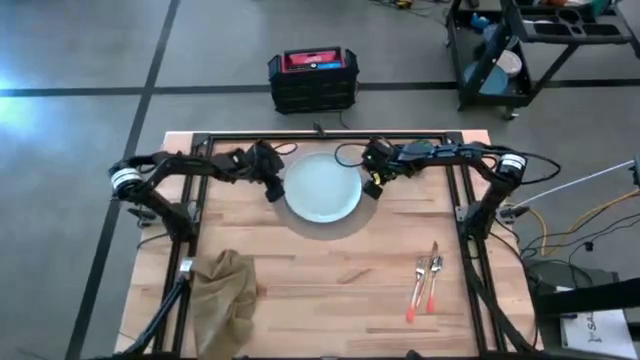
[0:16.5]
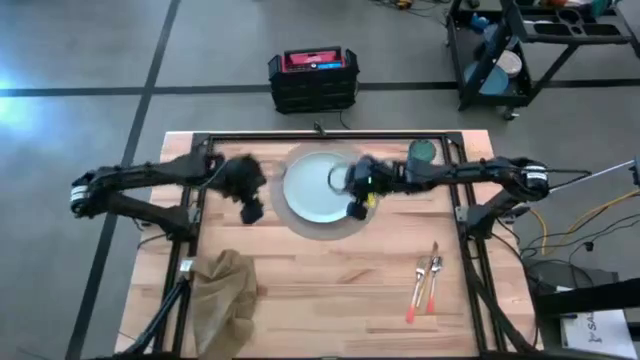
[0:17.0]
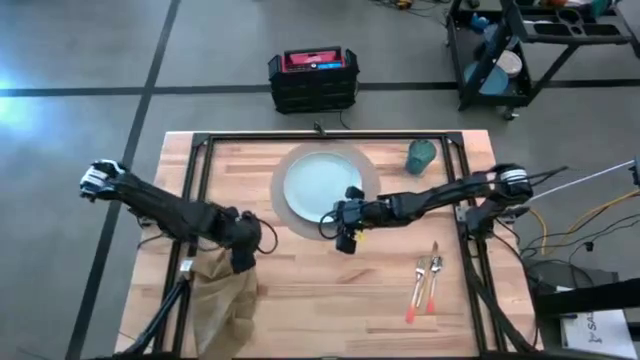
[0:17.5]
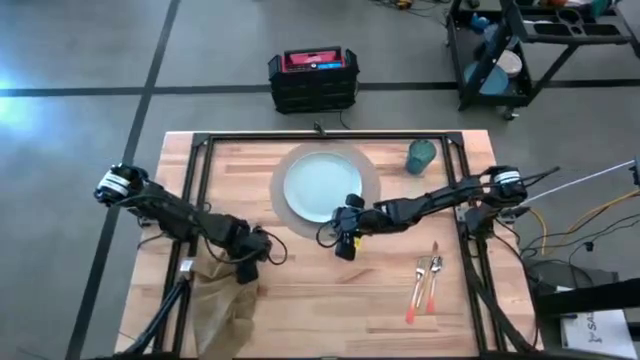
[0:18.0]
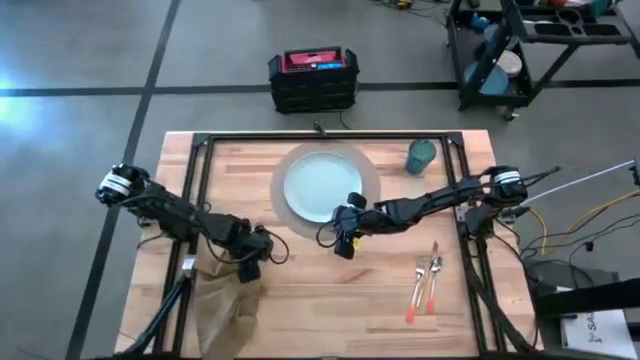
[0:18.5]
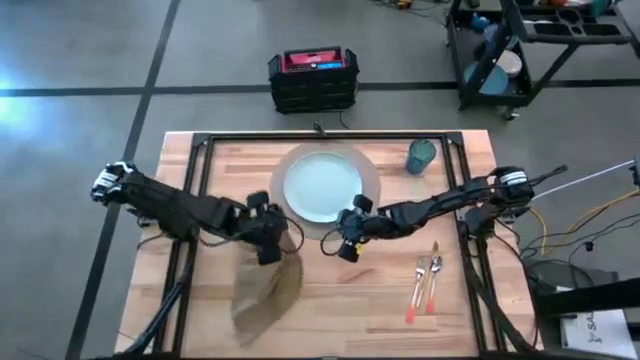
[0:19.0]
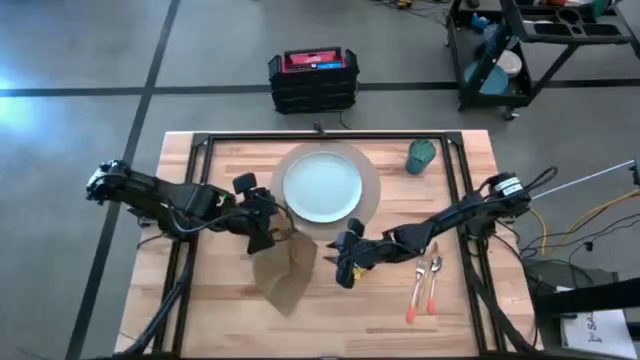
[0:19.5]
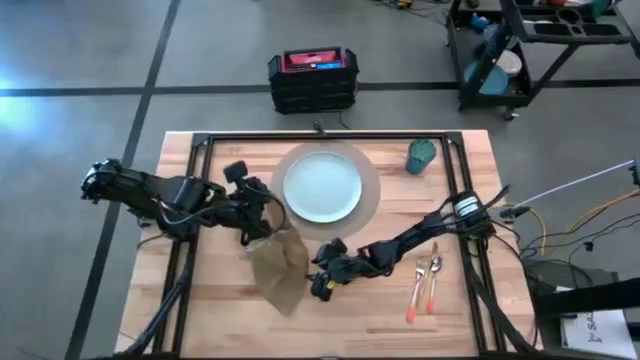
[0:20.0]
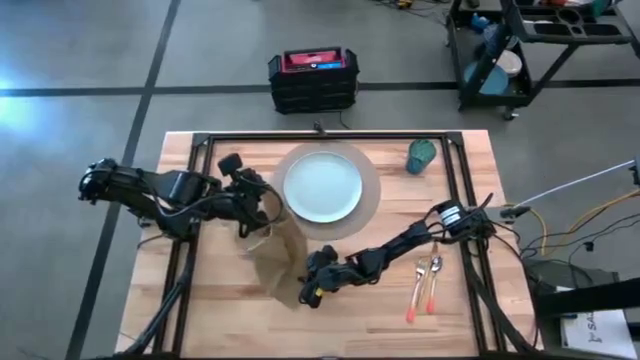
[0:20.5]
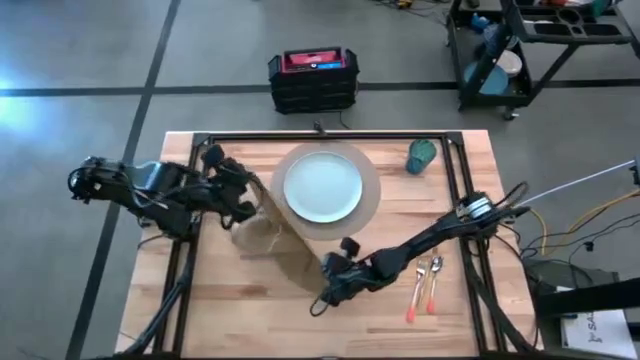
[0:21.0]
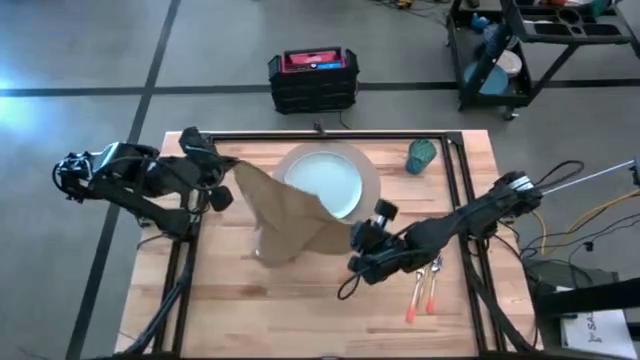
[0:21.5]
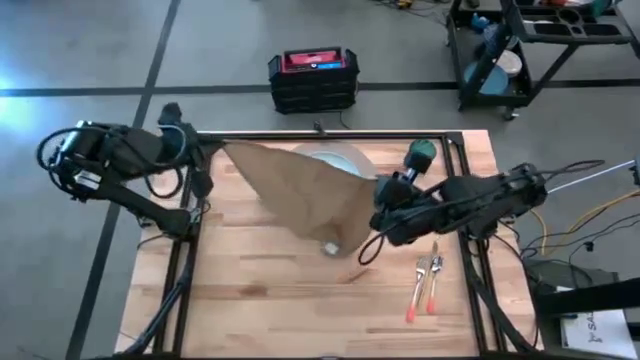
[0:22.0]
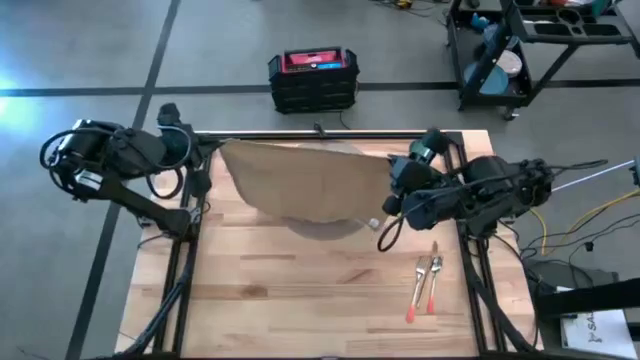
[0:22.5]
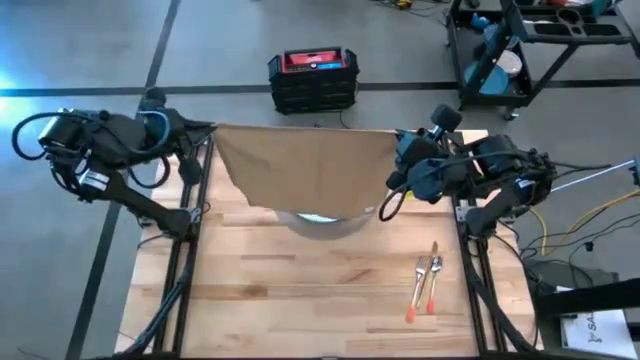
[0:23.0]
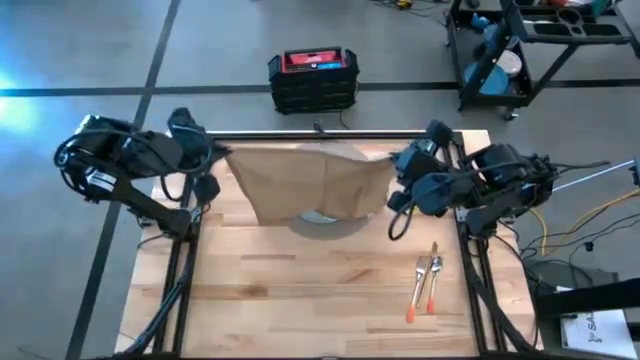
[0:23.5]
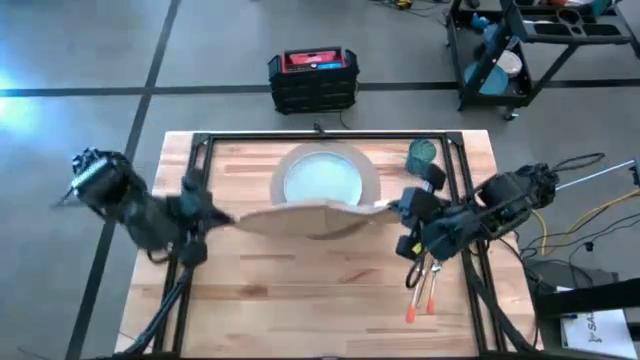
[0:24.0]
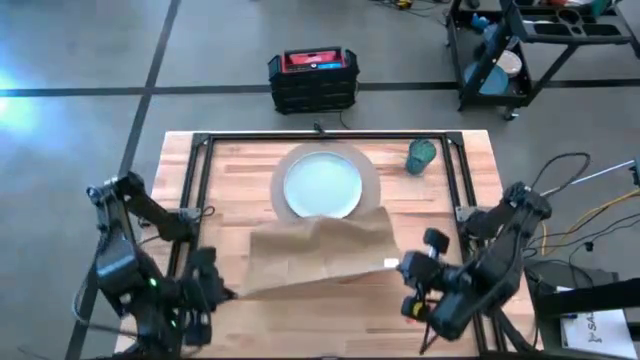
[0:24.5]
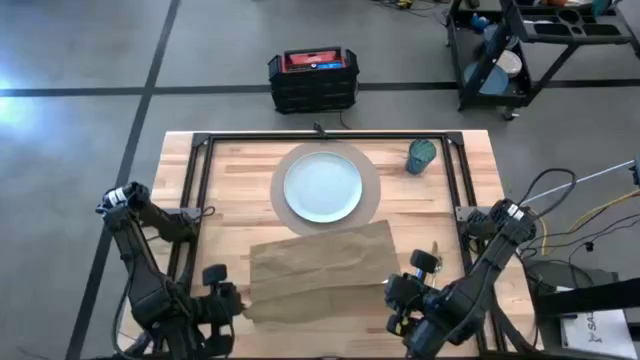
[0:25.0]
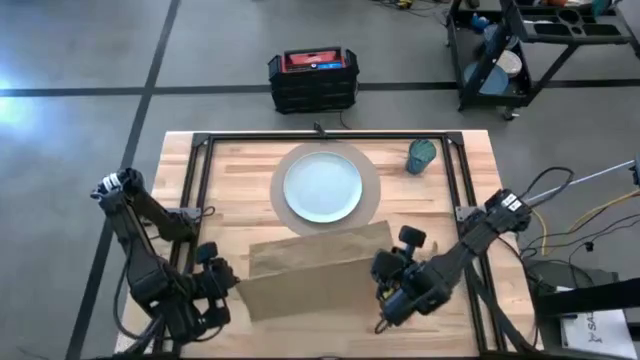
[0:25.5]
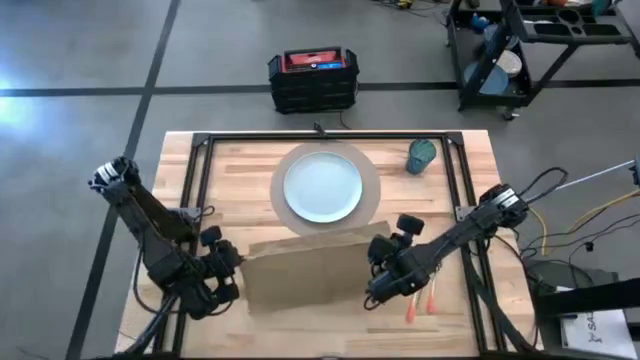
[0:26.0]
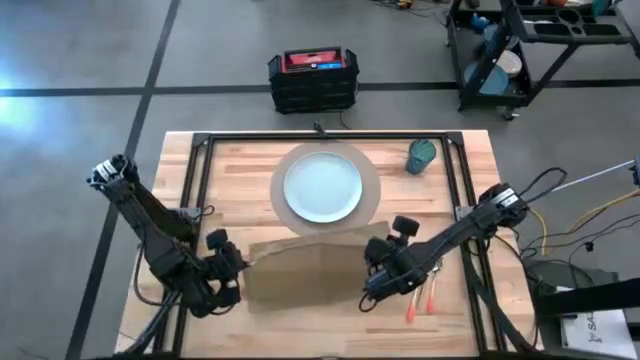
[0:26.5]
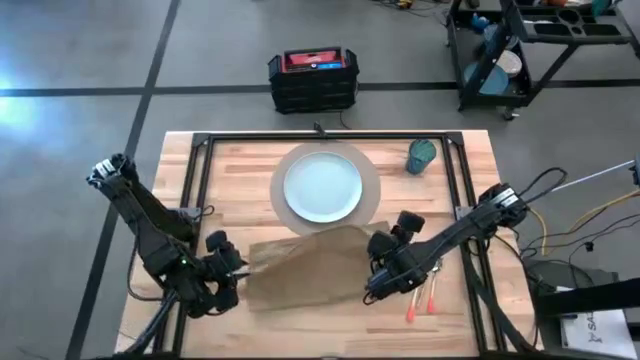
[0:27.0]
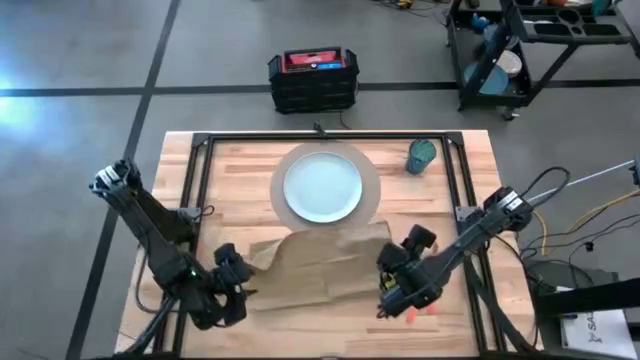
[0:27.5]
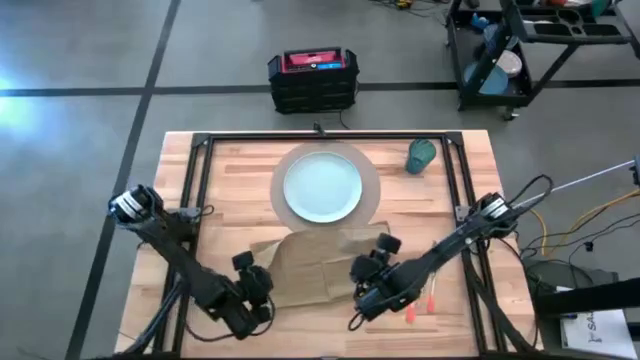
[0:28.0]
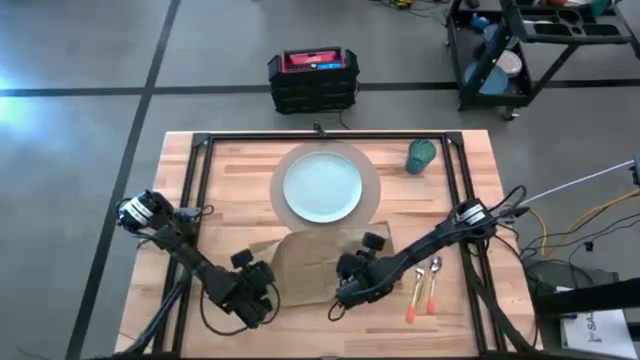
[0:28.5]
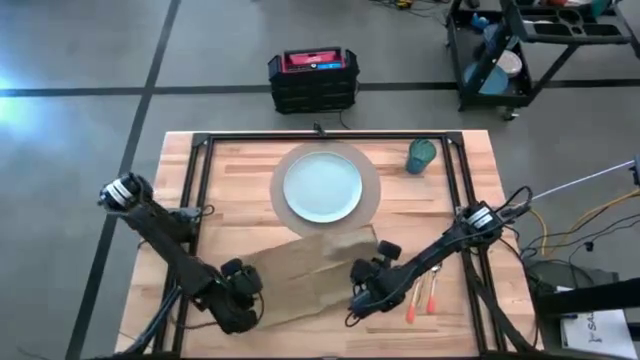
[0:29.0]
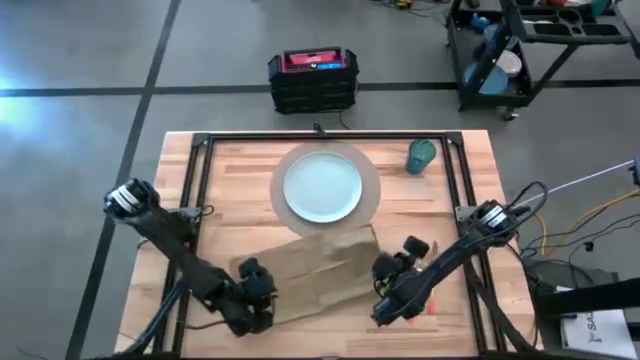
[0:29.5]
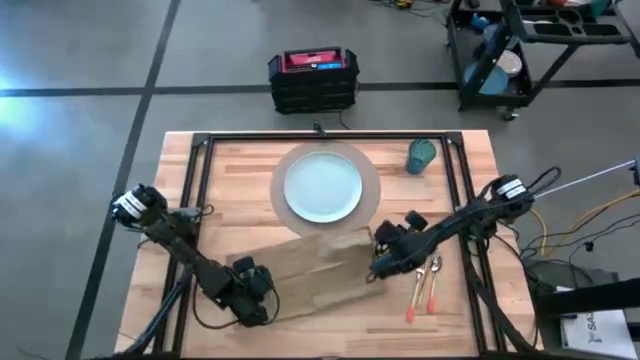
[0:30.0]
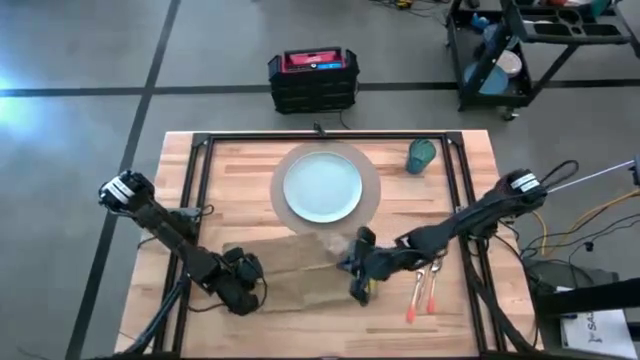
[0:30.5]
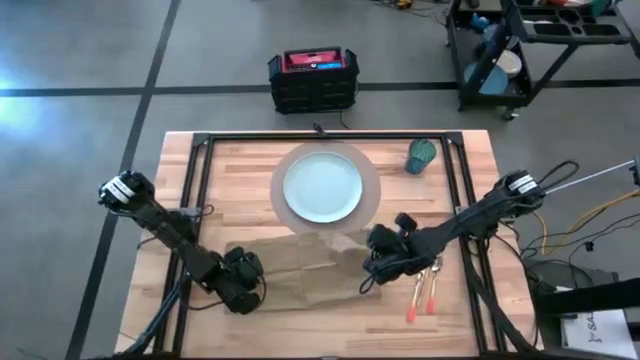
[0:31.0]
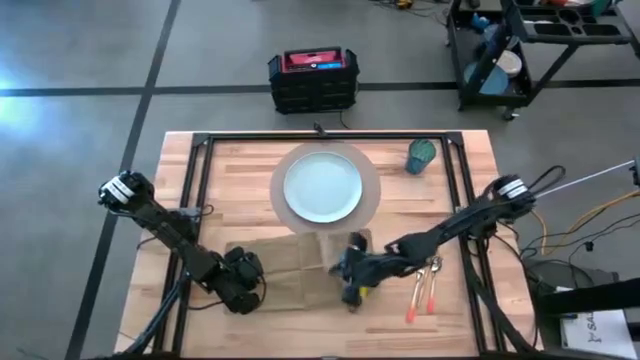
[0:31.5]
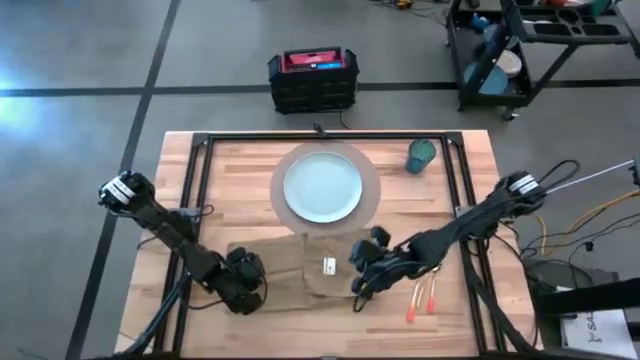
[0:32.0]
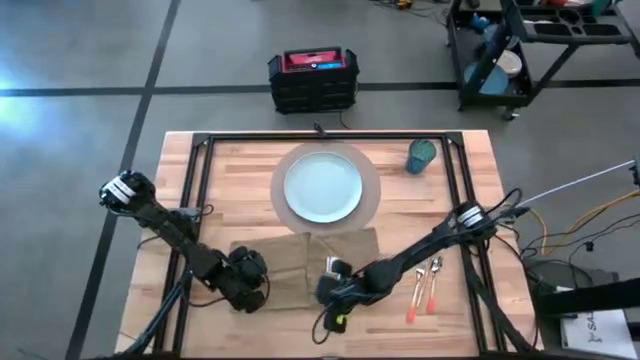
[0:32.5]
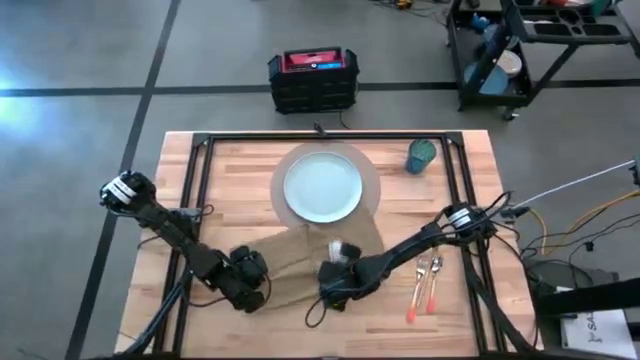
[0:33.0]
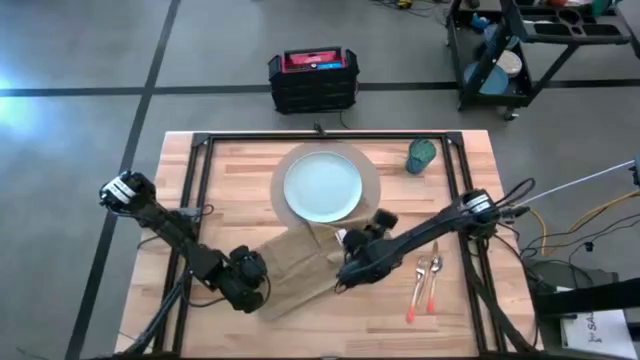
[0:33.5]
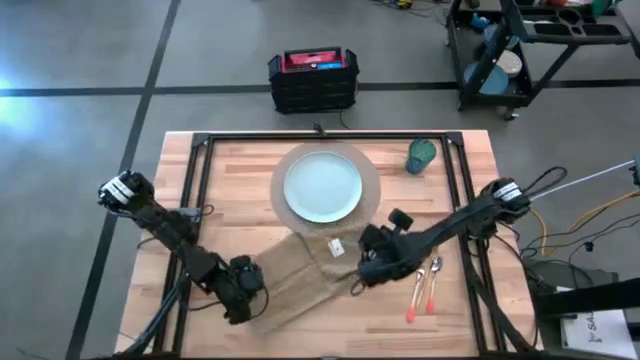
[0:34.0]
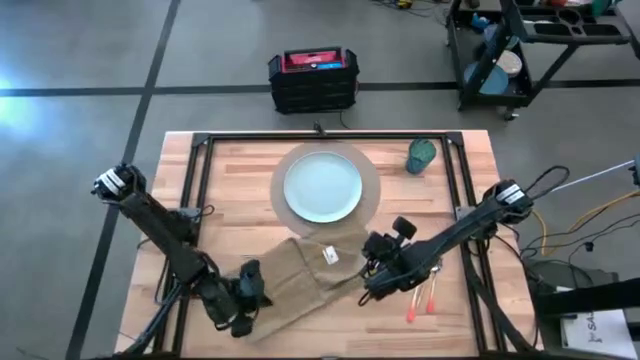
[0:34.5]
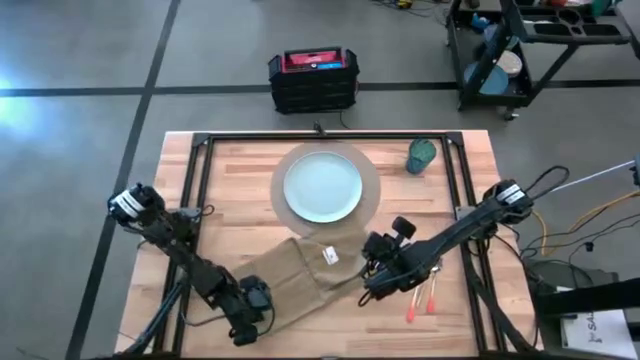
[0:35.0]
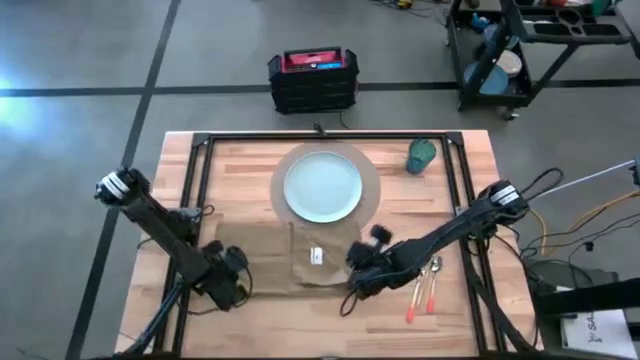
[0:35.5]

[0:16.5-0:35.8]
Task: Set table place
Fold the brown table napkin
